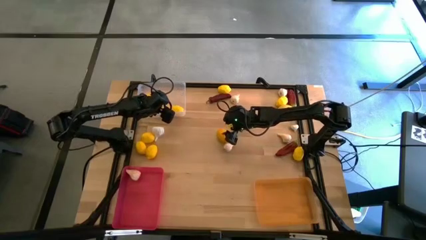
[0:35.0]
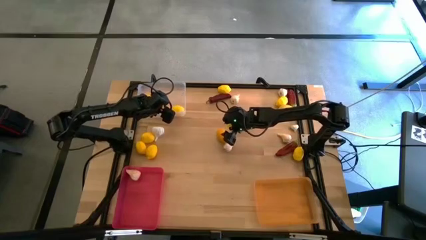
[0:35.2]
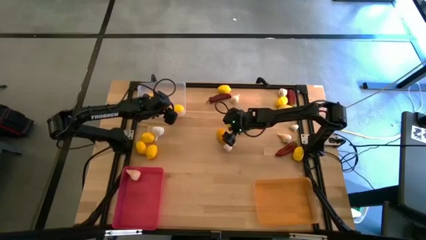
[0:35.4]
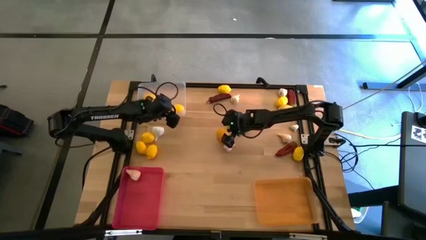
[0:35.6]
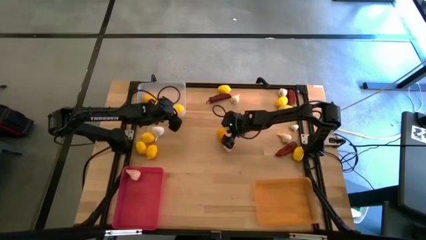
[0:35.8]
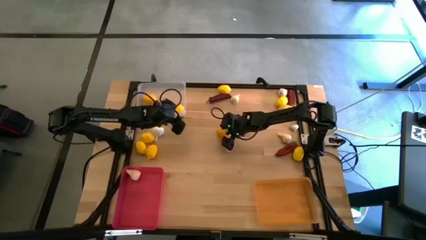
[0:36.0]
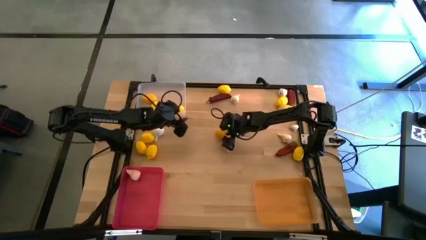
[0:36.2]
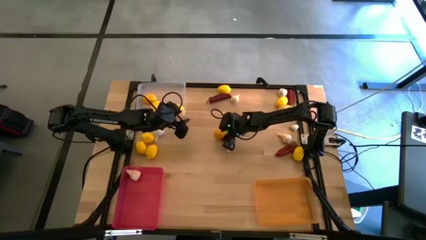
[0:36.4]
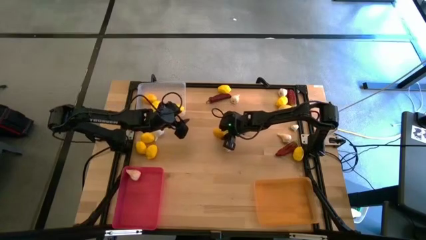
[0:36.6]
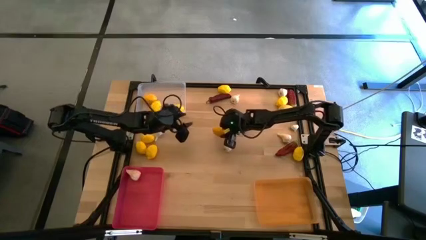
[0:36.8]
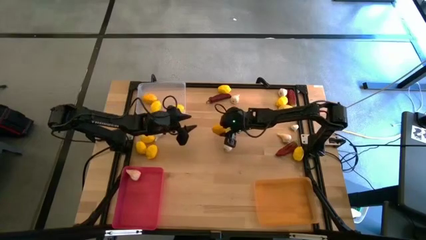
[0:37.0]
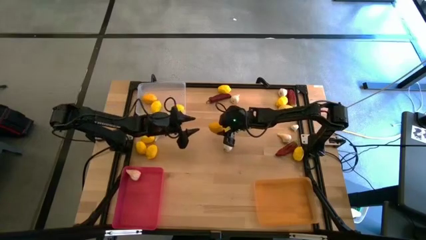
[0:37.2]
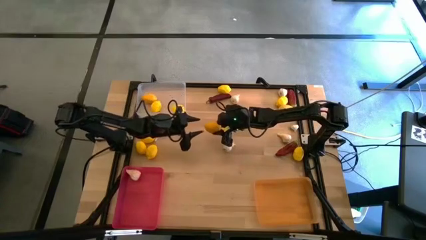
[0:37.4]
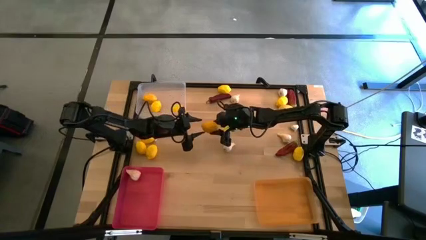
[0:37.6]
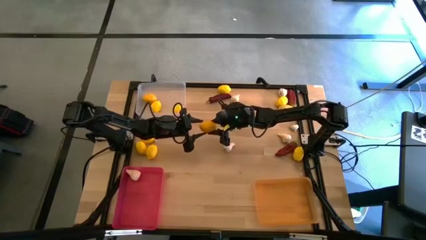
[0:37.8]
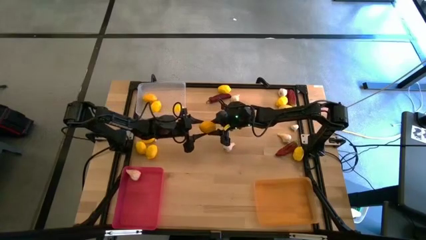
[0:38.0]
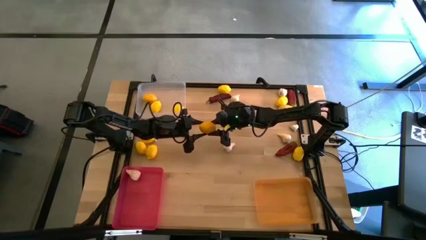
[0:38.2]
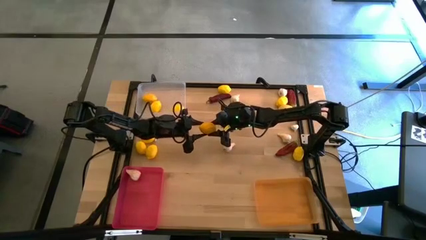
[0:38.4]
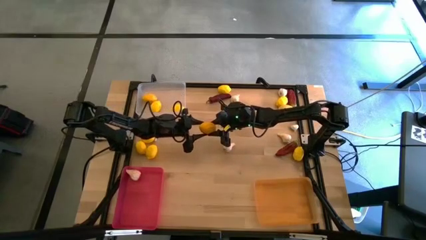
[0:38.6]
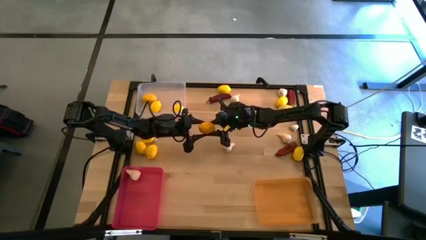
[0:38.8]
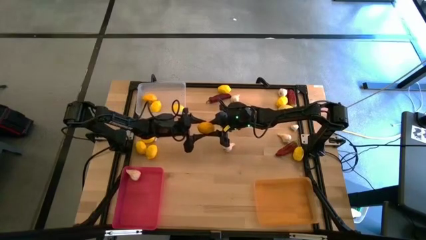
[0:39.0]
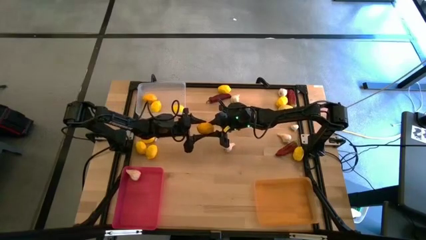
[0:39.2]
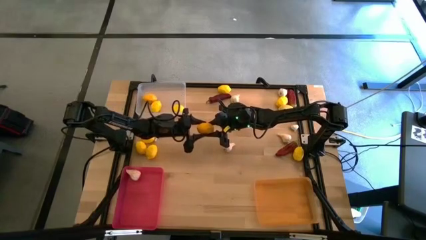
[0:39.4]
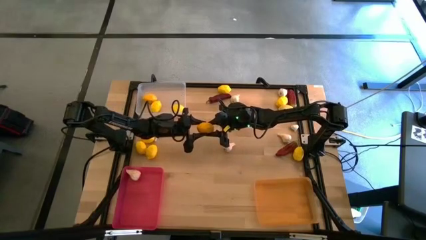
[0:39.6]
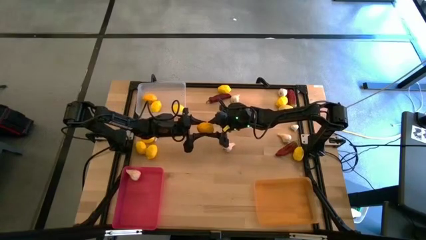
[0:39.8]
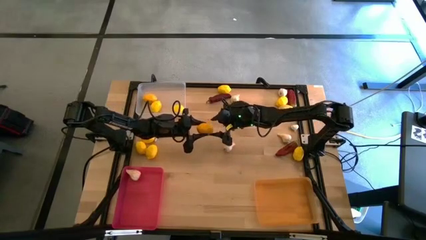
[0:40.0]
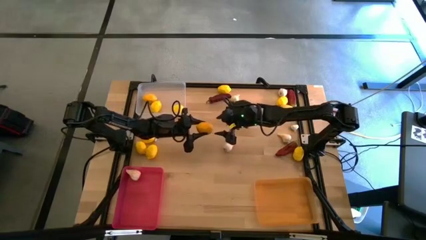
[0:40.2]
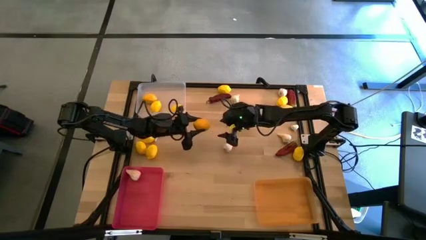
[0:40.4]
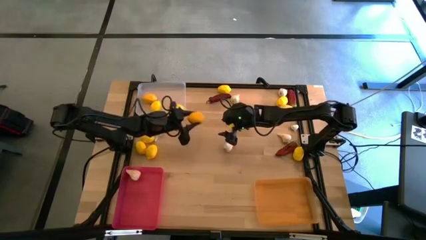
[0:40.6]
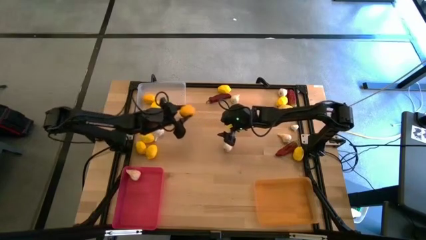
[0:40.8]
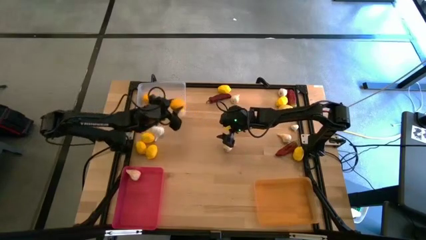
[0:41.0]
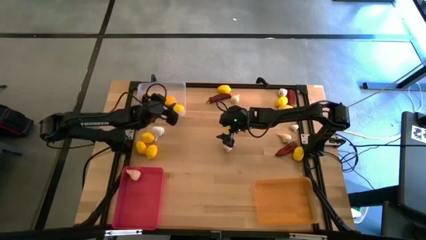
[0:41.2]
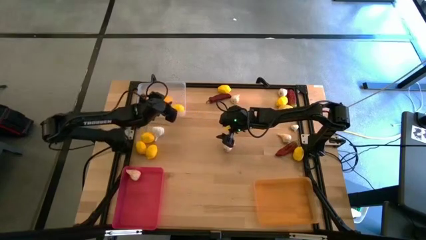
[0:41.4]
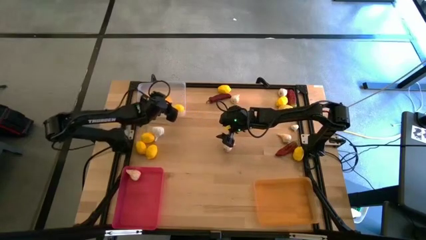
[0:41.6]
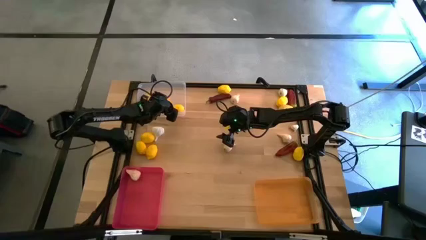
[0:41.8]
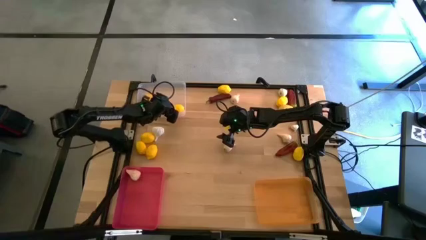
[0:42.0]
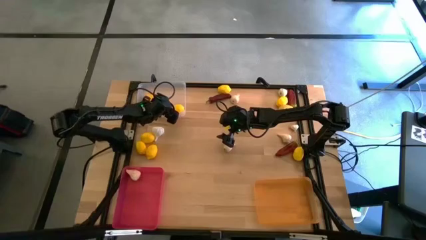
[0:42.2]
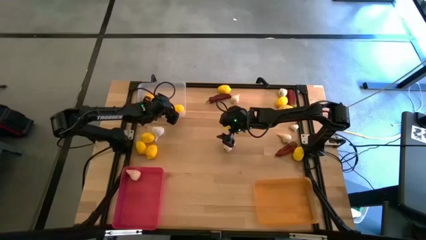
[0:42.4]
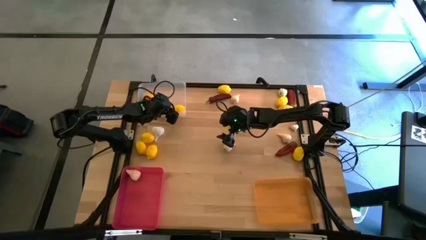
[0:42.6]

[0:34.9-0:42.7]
Task: Sort produce into baskets
Put the yellow lemon into the left white bin

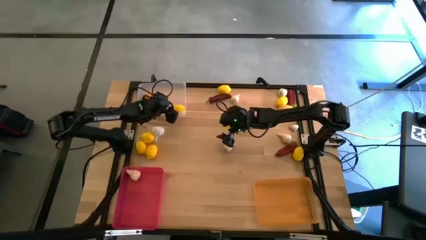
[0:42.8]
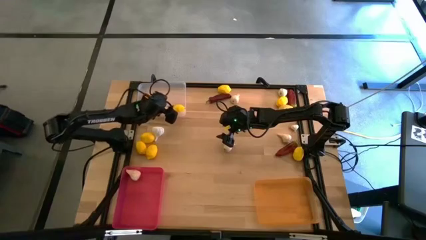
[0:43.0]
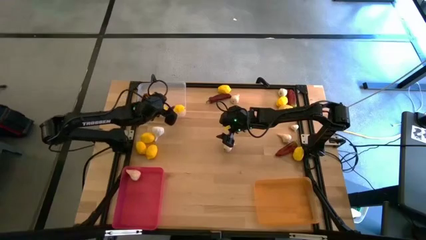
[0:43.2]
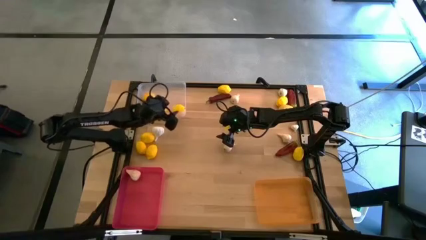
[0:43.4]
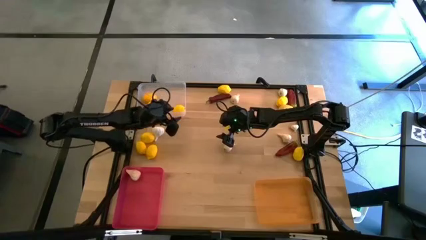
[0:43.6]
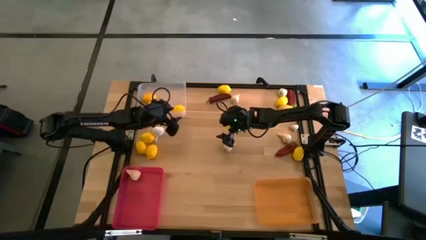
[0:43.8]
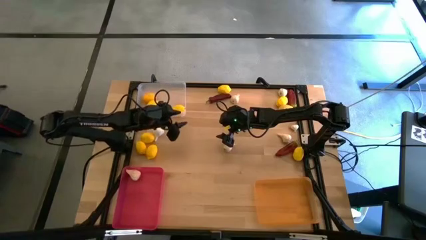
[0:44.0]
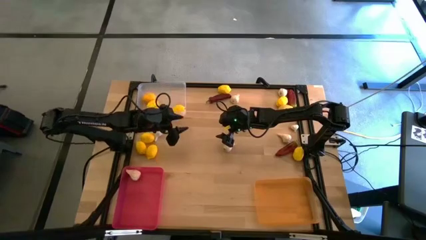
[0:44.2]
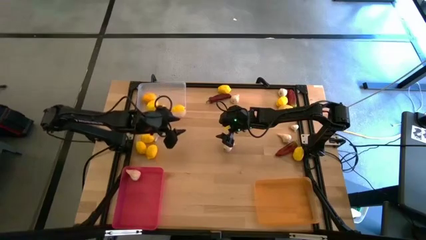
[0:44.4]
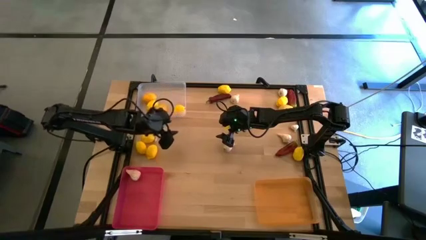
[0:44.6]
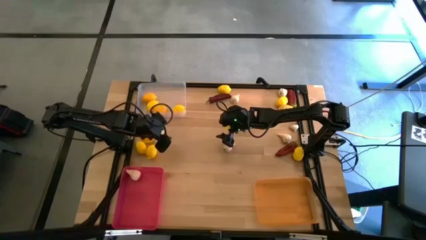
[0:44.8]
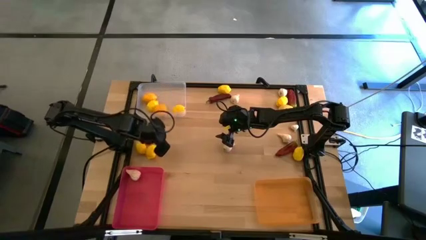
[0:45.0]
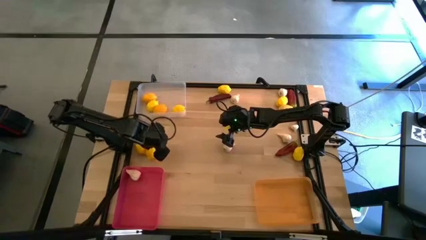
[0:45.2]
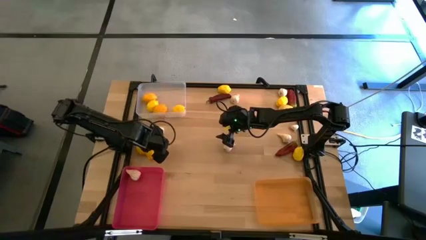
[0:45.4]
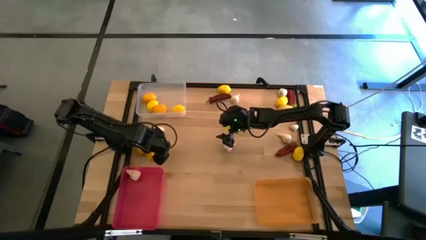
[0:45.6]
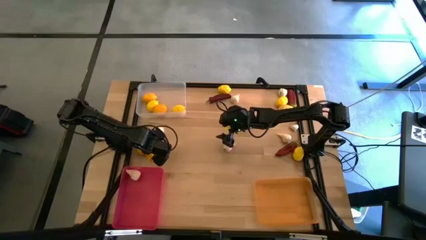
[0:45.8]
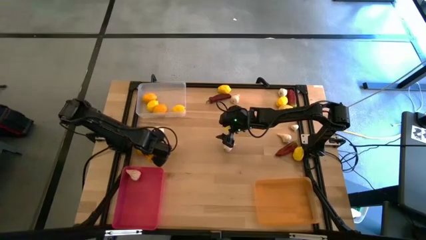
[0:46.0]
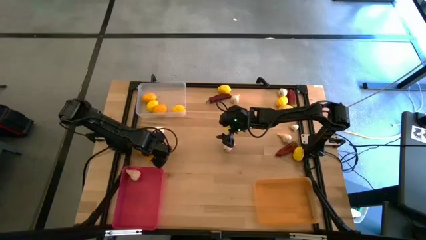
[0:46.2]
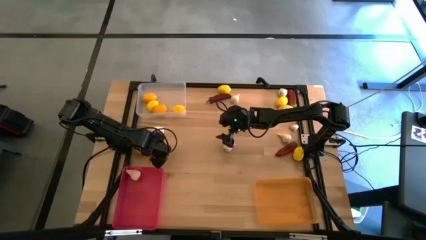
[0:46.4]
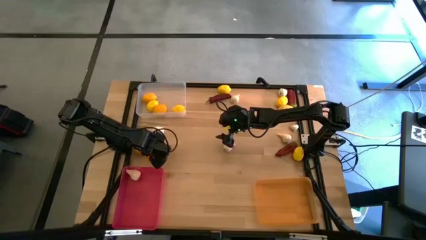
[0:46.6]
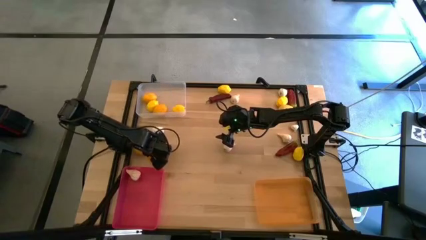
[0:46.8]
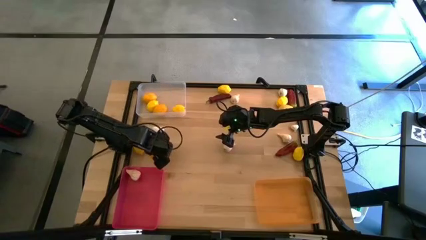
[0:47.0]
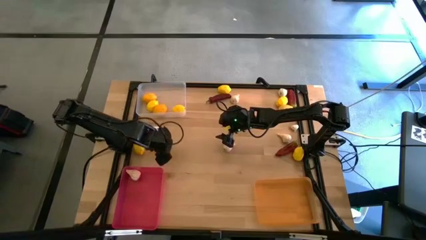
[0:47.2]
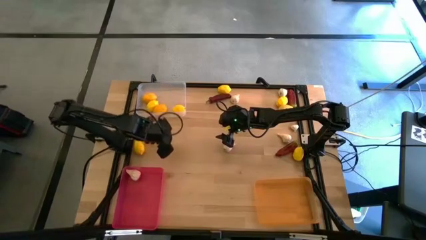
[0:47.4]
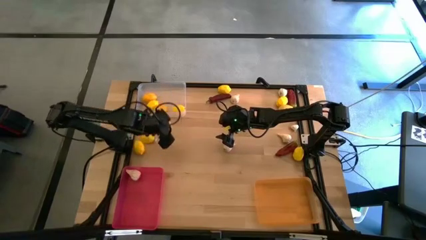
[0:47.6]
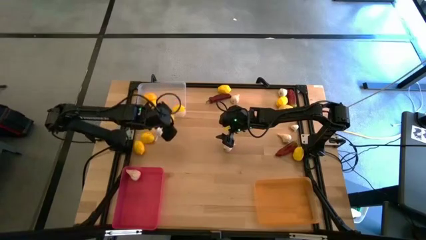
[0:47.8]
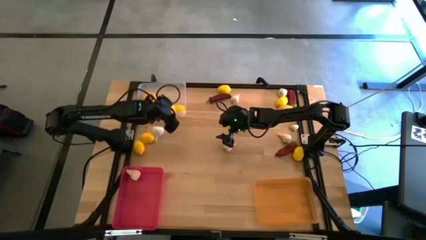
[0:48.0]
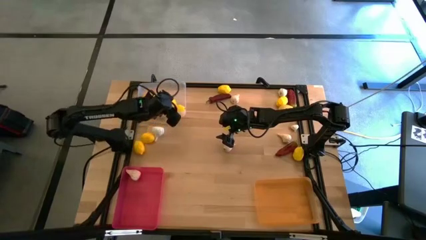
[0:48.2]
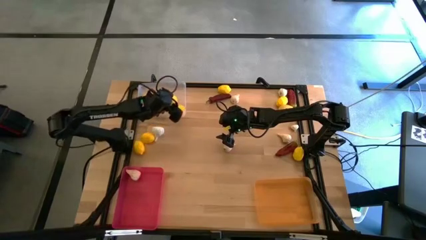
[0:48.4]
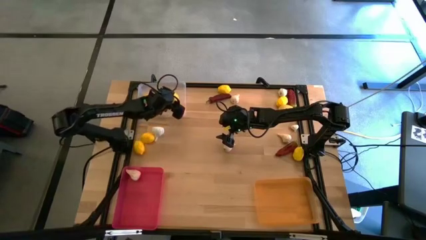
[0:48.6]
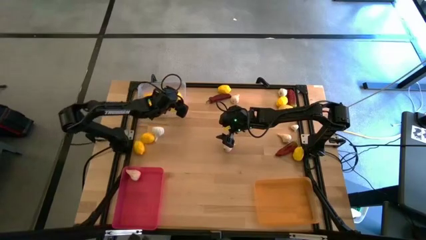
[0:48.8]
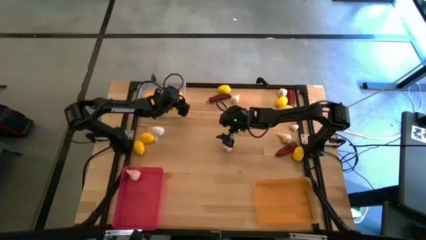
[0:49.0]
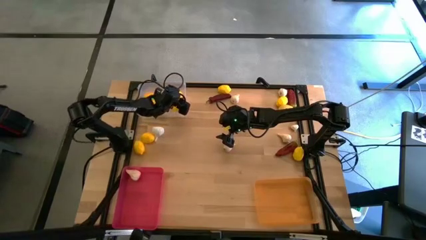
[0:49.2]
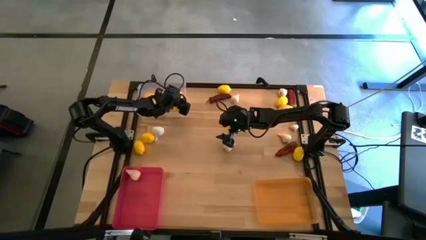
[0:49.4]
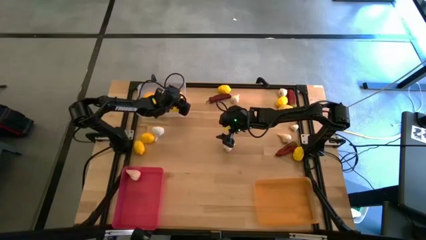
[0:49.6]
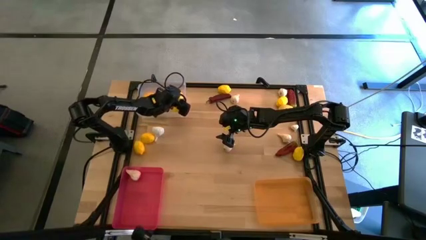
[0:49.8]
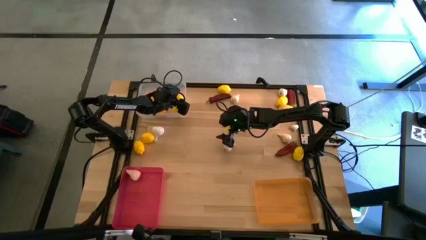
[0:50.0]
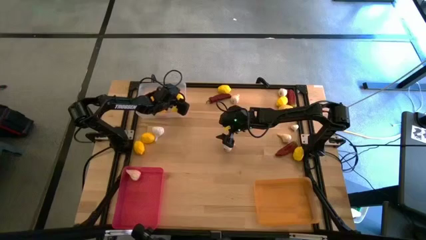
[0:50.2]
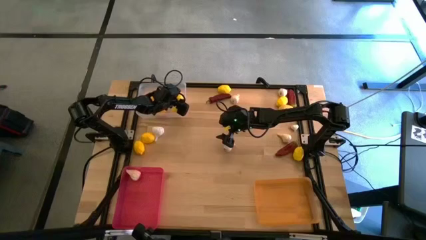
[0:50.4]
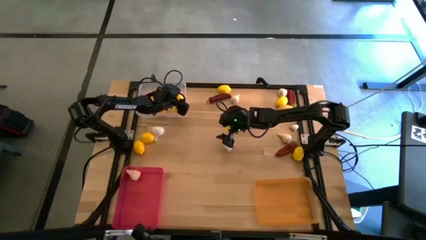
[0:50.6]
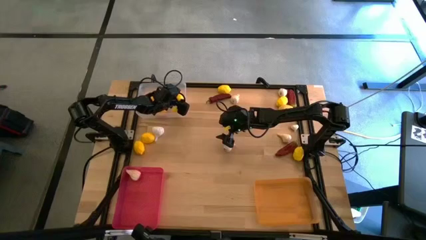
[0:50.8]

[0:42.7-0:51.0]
Put the yellow lemon into the left white bin
